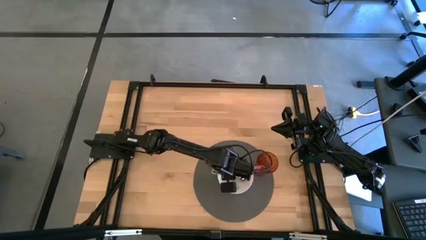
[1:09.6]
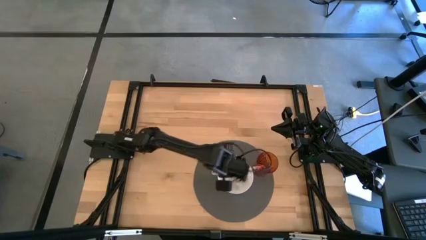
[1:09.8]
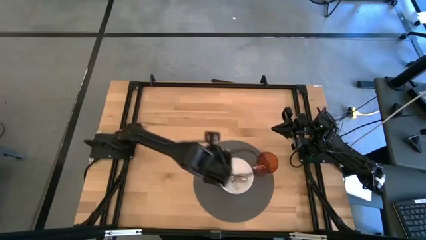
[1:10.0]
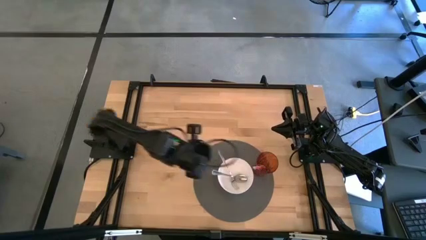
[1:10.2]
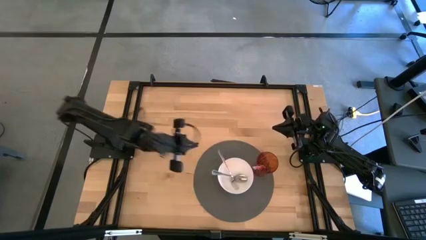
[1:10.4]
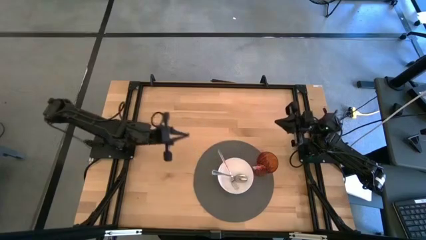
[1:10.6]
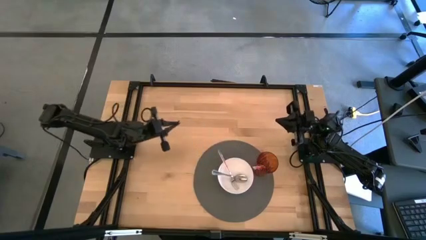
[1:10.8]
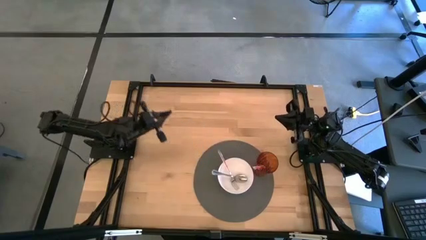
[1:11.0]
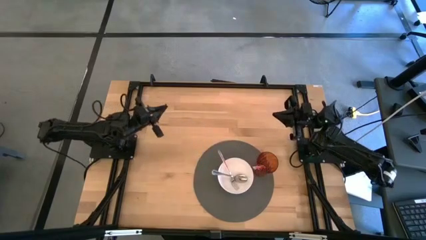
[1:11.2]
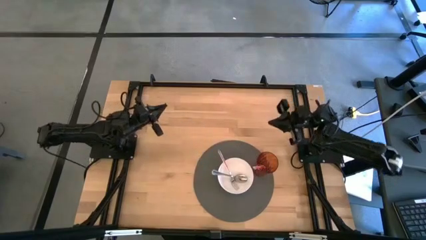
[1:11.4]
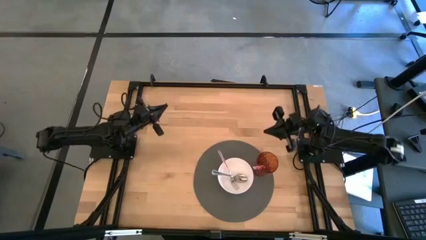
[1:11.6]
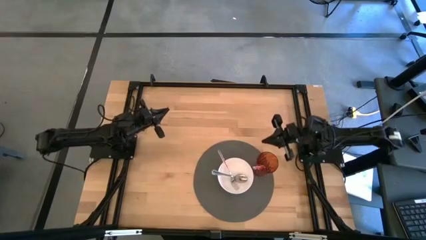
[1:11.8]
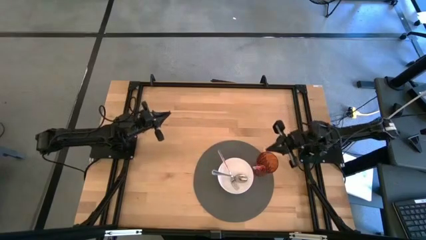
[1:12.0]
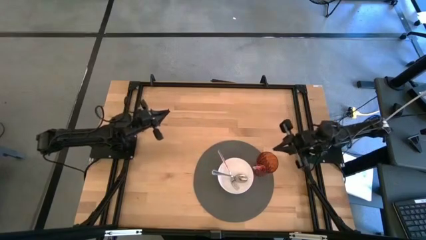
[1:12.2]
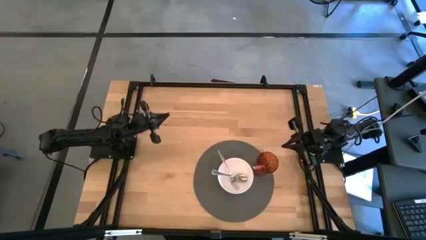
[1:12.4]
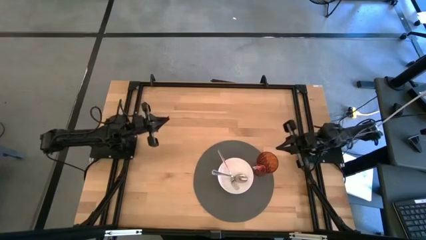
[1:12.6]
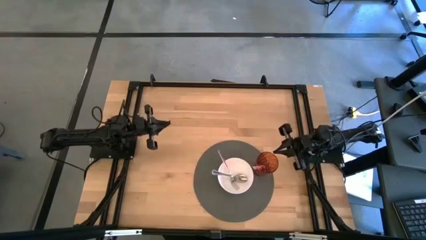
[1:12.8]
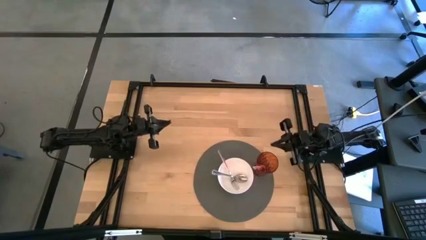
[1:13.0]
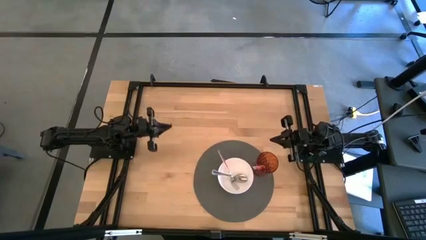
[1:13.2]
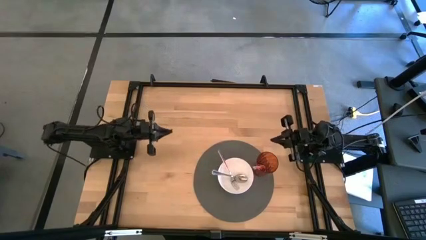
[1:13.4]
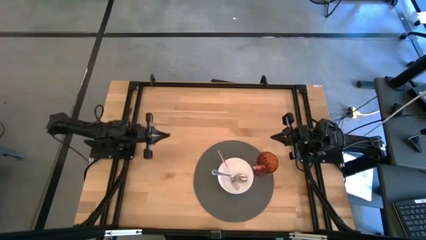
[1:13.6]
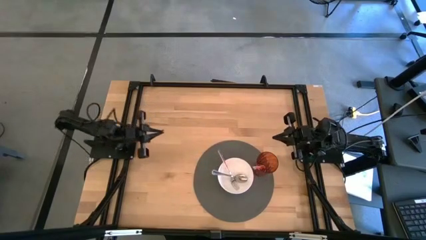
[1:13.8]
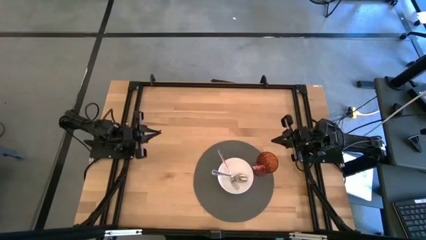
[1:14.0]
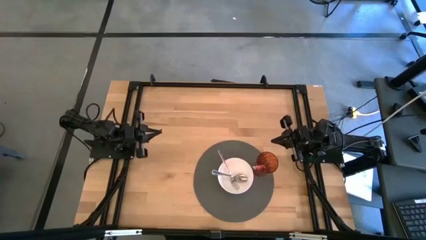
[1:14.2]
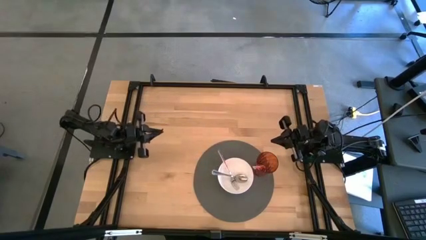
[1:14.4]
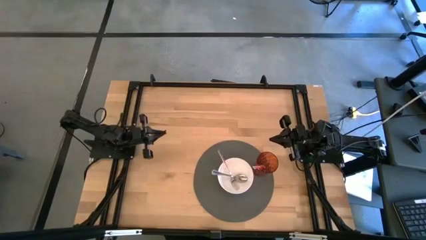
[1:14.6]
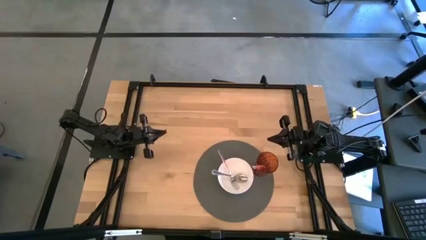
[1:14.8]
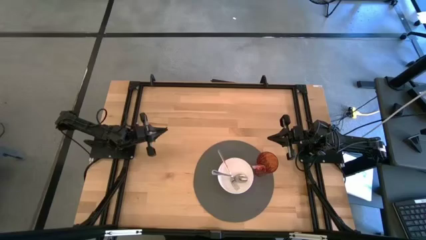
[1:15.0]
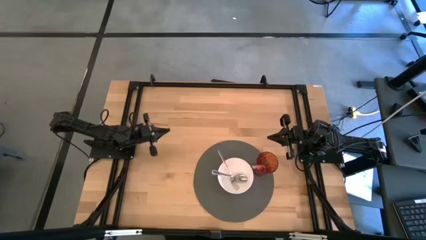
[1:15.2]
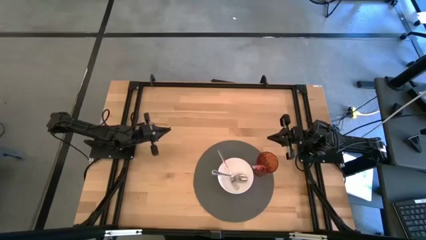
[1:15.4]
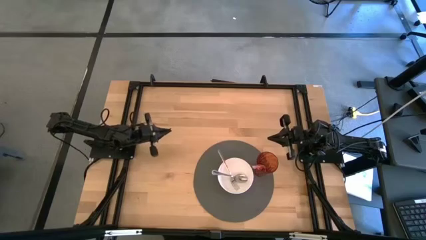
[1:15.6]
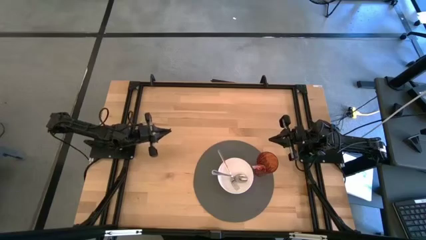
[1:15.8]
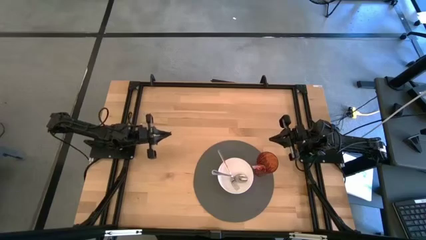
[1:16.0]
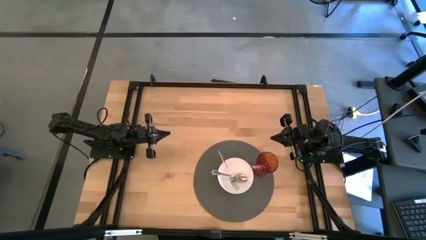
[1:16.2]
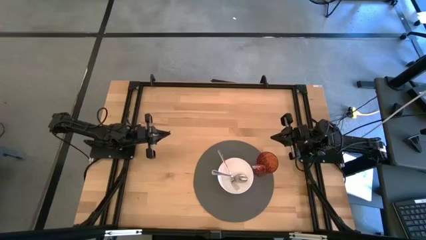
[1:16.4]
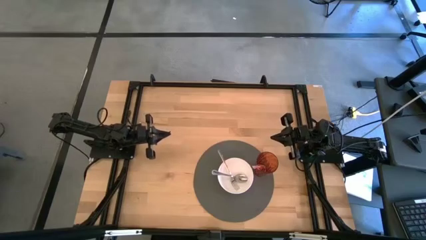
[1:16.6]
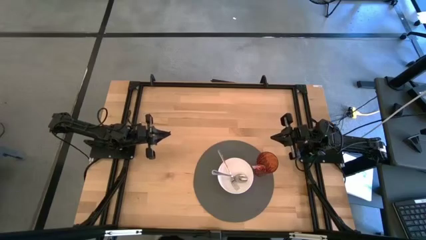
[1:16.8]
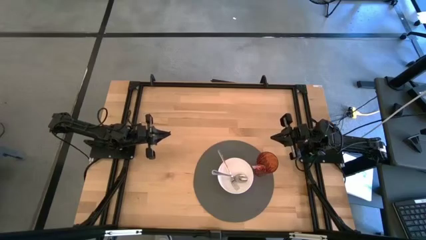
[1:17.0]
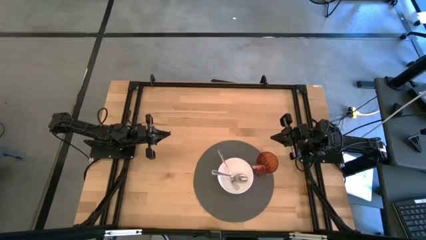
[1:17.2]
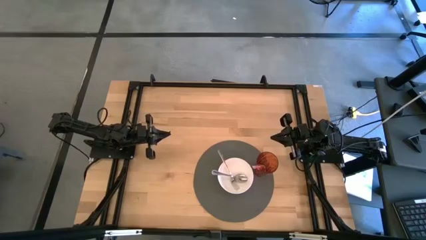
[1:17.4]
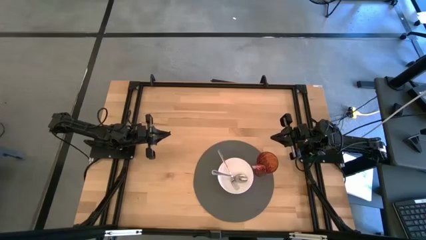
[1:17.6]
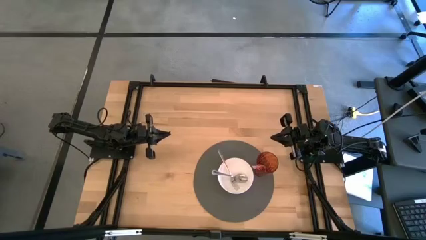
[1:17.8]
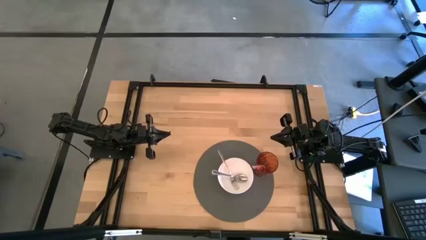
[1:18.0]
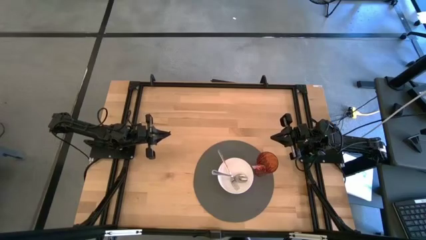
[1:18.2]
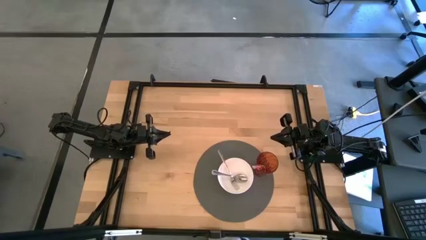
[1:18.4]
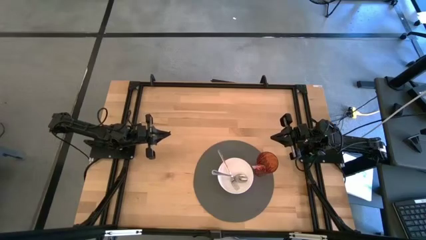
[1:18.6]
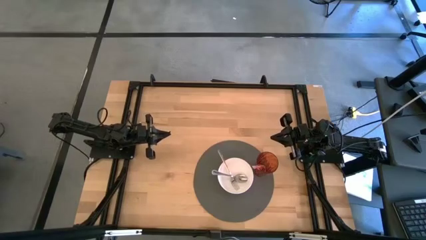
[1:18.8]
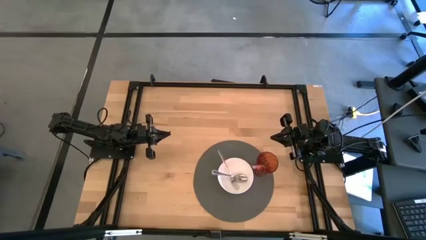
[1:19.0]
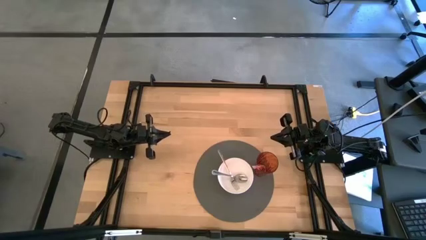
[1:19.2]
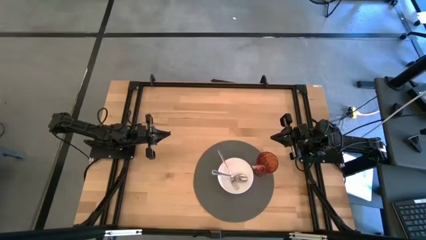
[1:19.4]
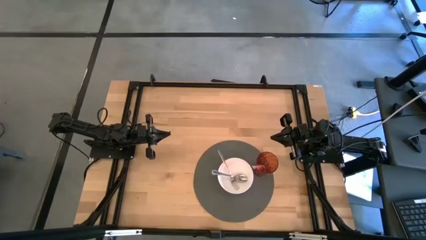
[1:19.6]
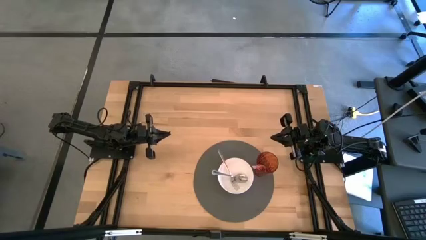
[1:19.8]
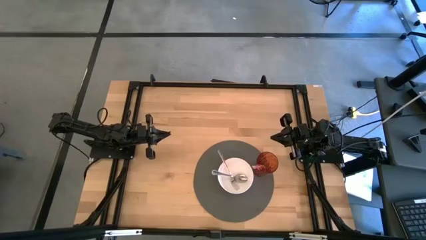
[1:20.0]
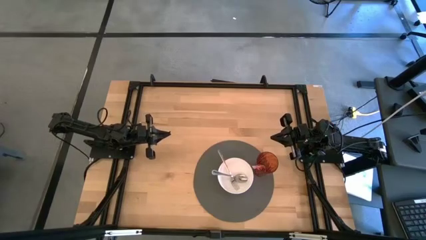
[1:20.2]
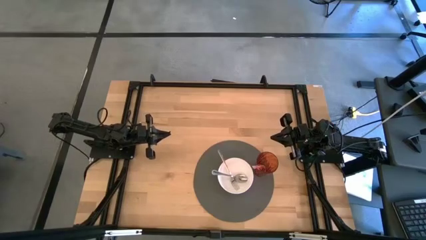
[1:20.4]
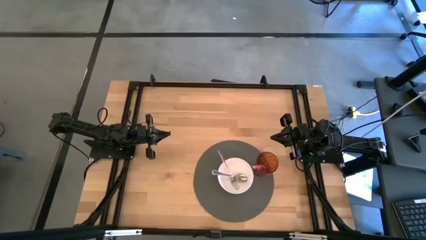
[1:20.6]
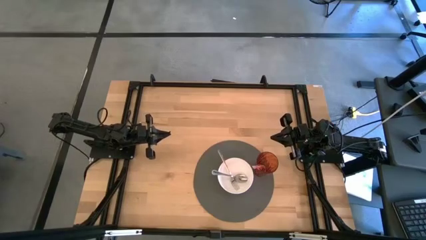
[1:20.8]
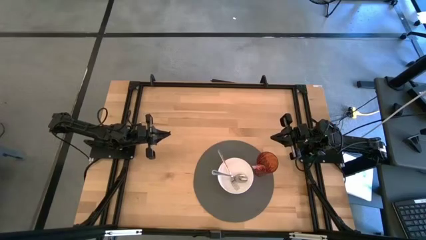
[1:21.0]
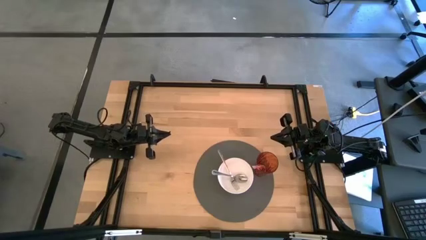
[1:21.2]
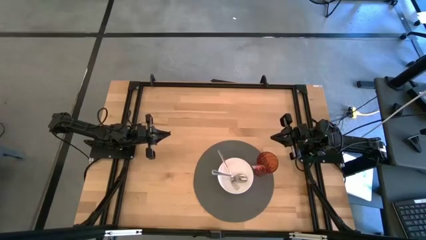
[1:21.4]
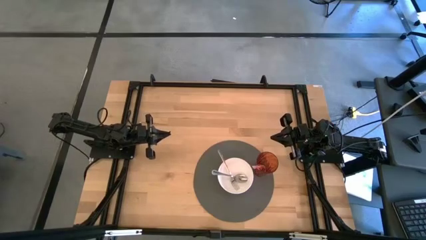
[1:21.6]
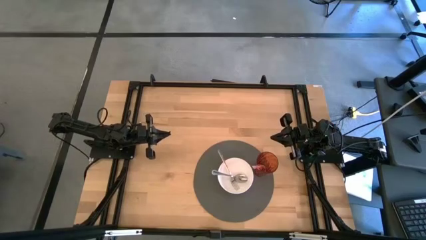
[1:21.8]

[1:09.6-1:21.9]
Task: Pick & Place Utensil
Return to Home Position

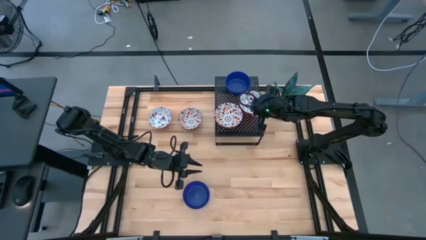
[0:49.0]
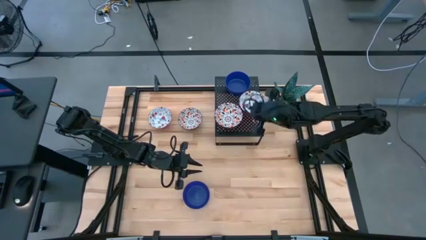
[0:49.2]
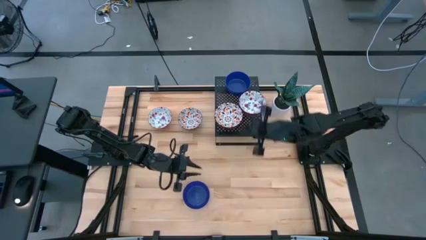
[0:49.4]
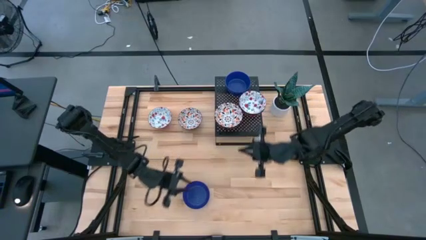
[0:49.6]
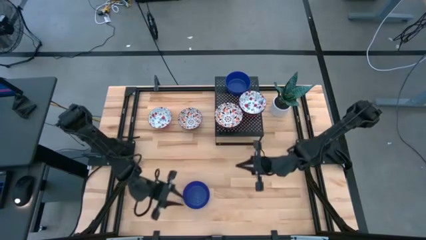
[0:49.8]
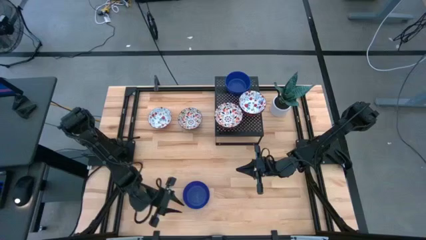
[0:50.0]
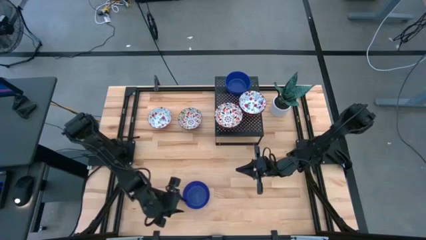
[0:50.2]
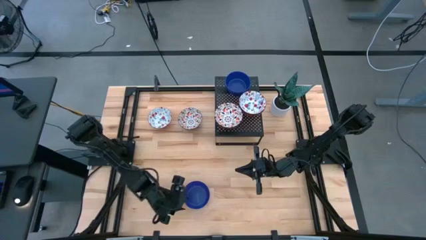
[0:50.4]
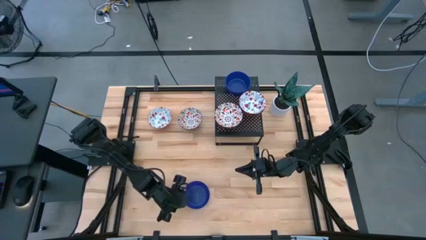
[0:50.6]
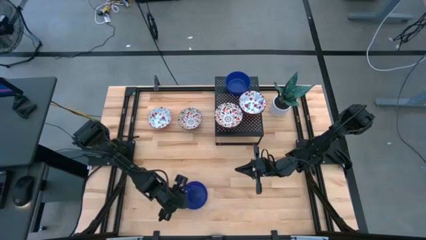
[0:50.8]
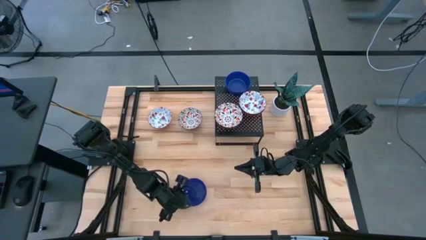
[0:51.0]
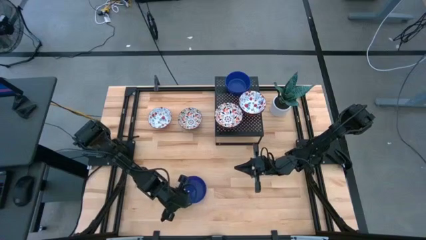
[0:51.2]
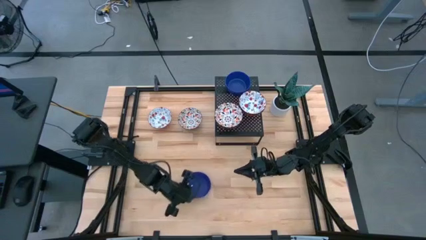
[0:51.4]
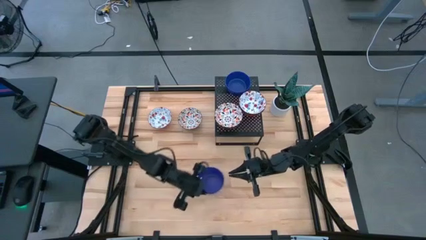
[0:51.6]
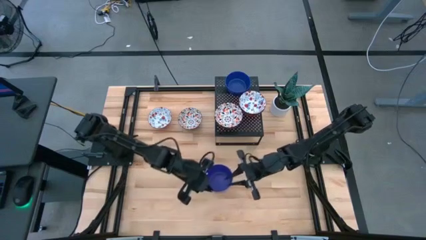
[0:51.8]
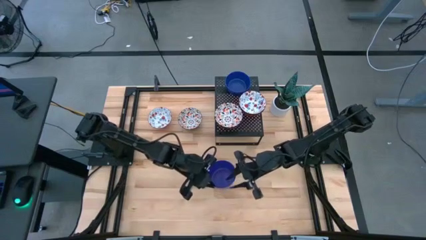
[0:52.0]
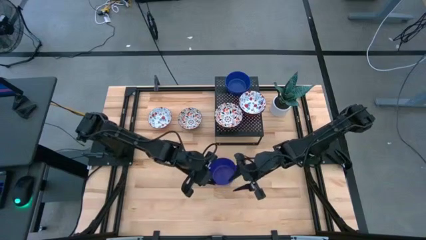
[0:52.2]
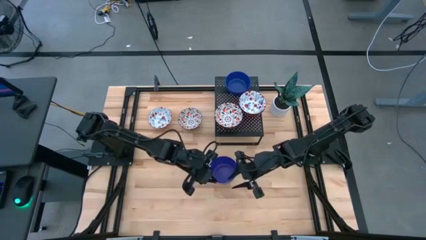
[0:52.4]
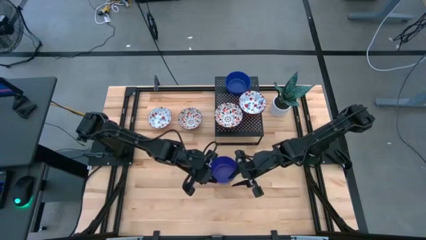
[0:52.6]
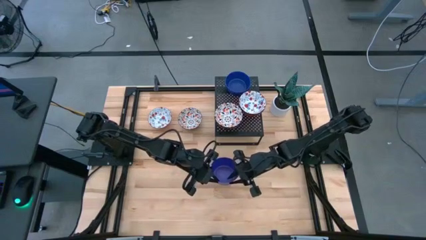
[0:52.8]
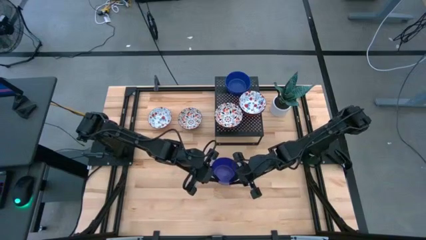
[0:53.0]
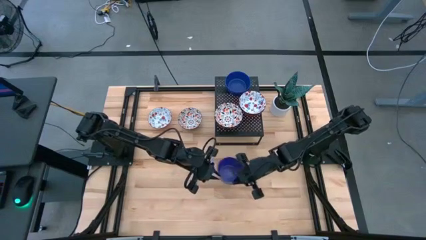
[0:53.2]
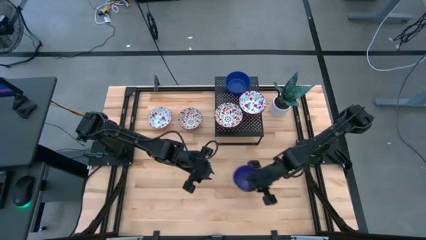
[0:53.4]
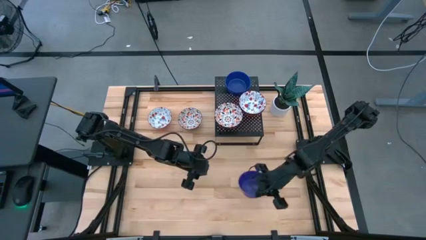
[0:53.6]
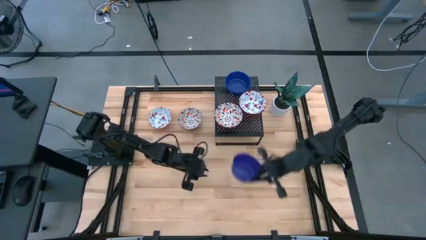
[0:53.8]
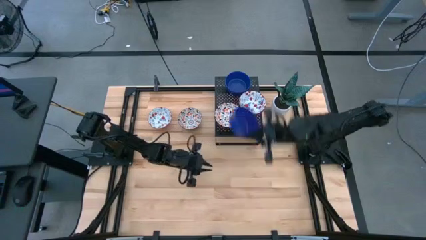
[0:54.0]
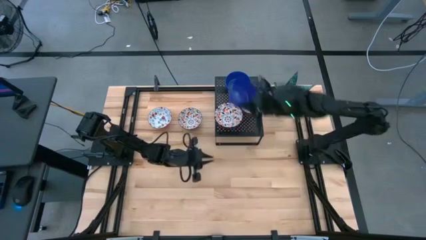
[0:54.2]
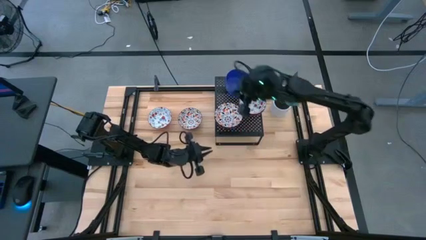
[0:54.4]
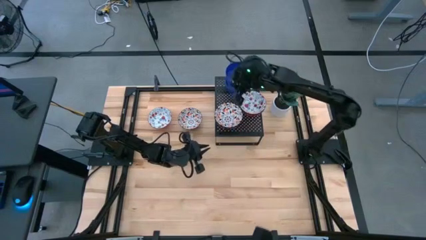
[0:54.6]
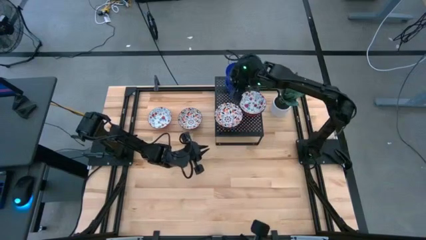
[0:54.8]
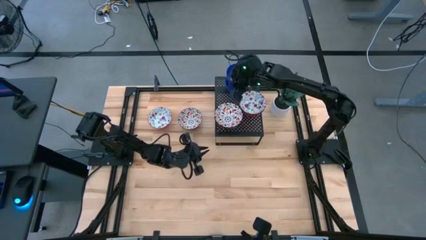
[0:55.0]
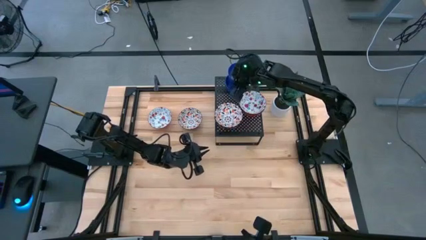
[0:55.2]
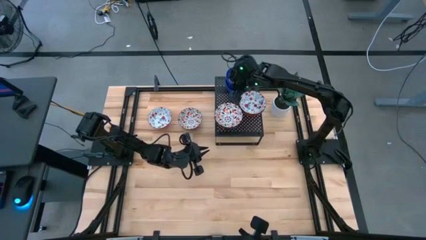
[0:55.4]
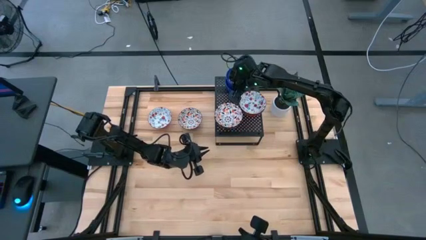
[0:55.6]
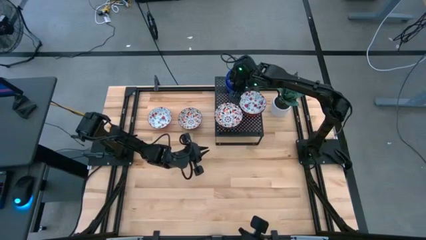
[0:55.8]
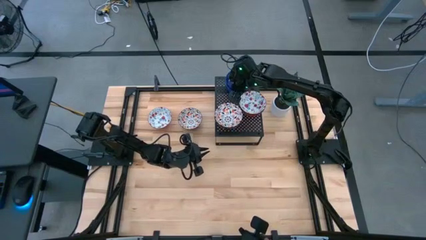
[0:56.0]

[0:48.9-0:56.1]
Task: Pick & Place Mini bowls
Stack the blue bowl on top of the blue bowl on the shelf
